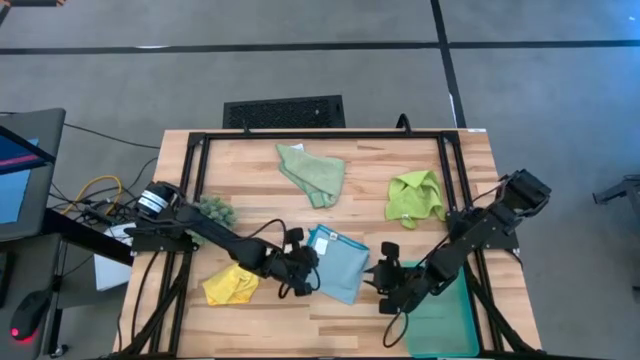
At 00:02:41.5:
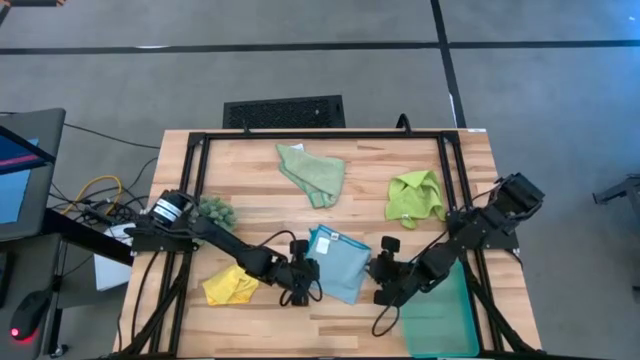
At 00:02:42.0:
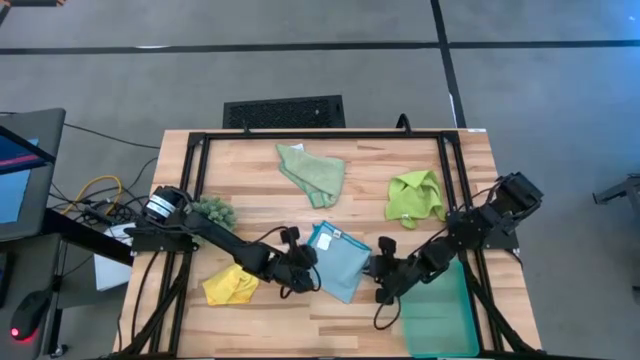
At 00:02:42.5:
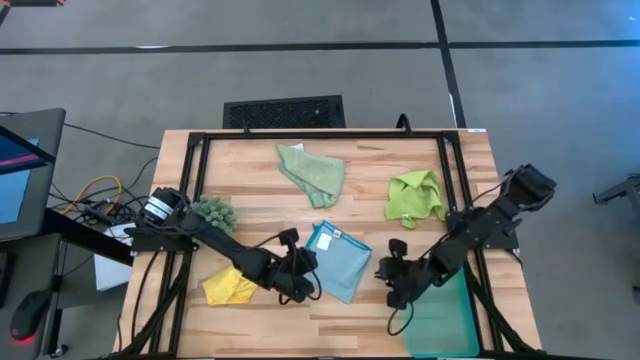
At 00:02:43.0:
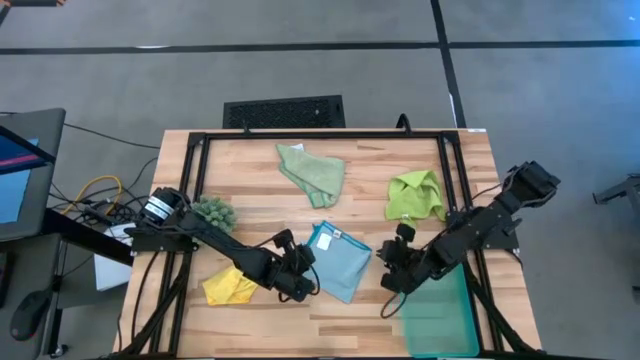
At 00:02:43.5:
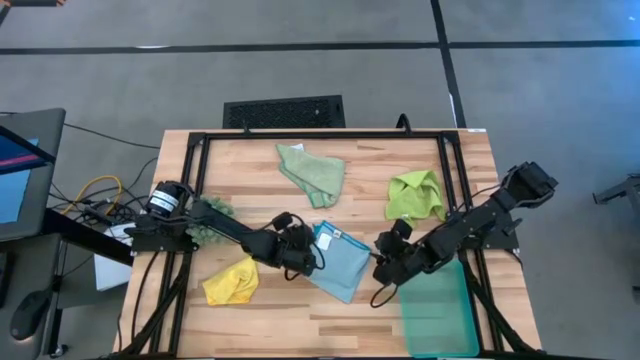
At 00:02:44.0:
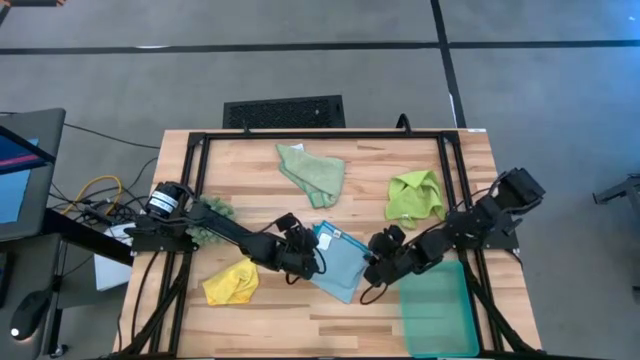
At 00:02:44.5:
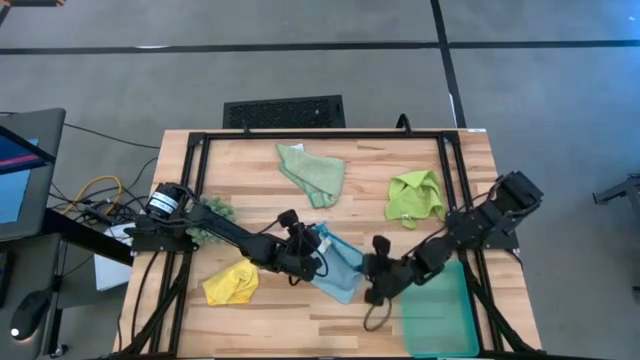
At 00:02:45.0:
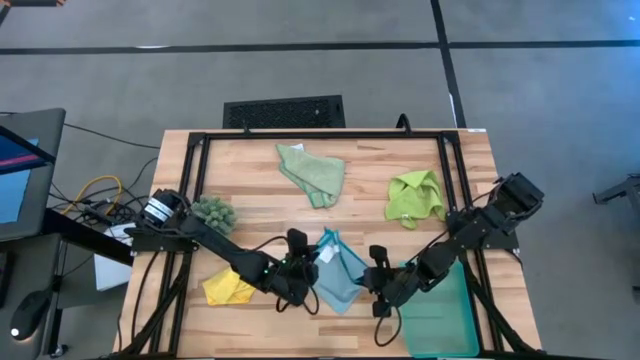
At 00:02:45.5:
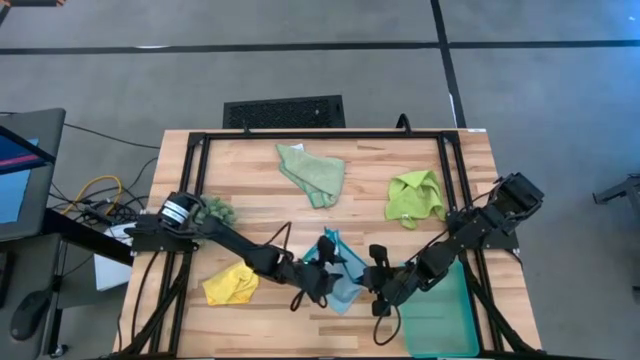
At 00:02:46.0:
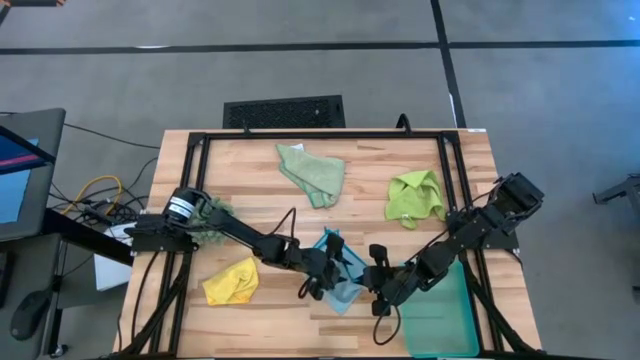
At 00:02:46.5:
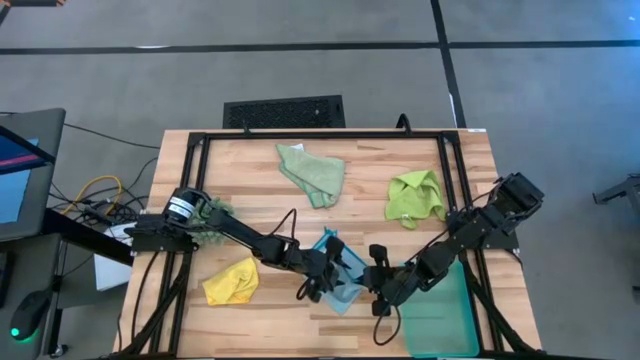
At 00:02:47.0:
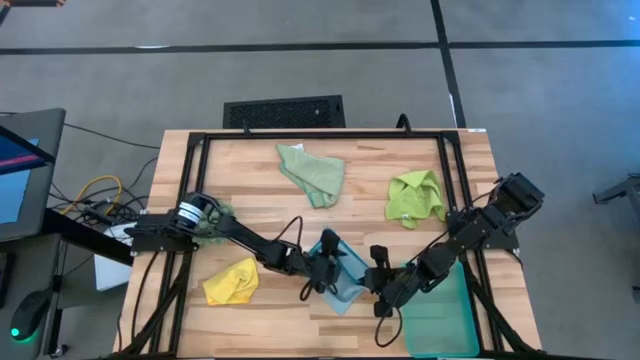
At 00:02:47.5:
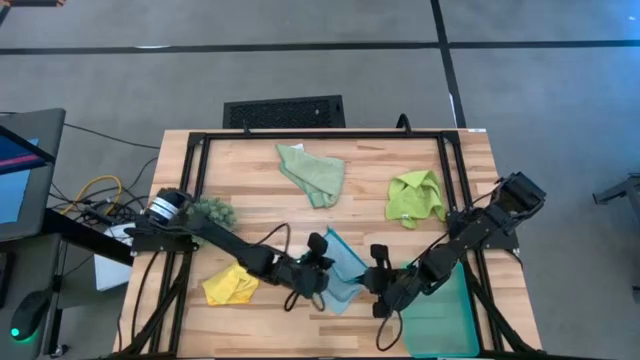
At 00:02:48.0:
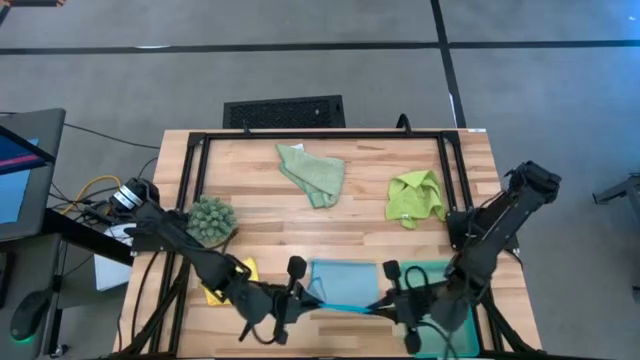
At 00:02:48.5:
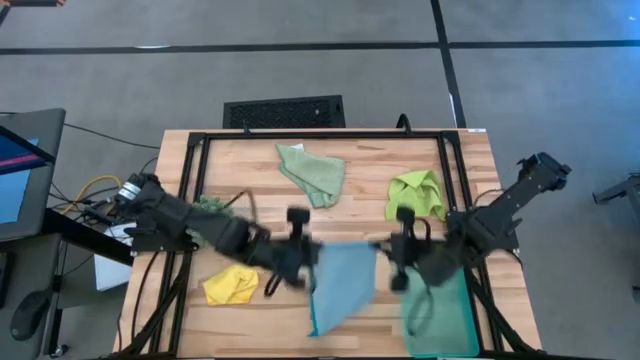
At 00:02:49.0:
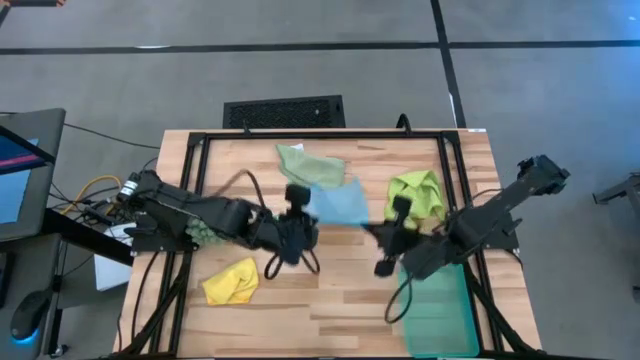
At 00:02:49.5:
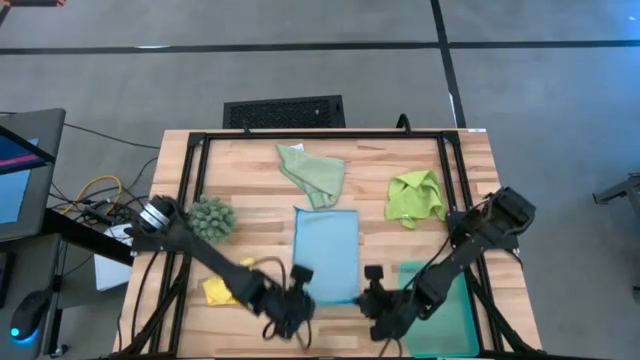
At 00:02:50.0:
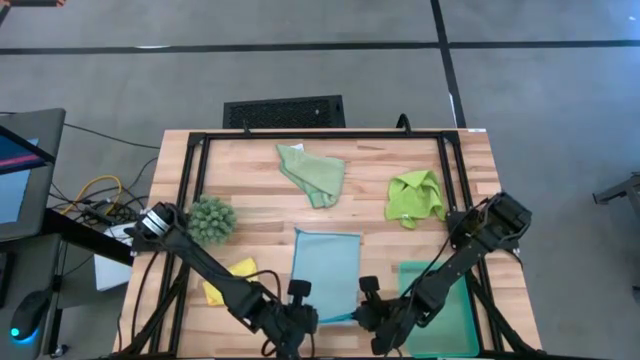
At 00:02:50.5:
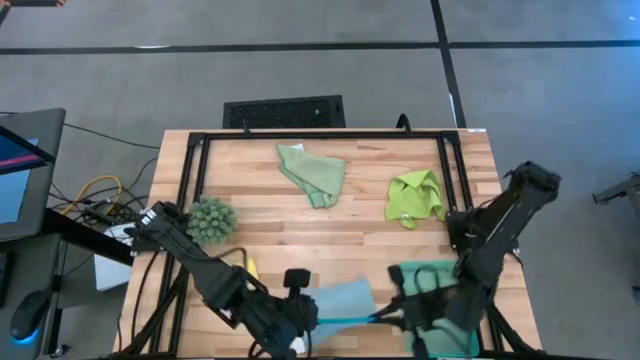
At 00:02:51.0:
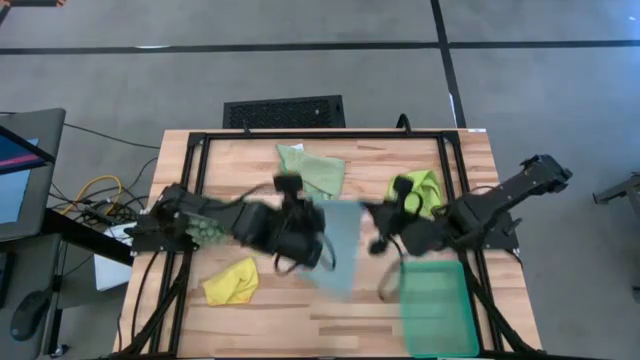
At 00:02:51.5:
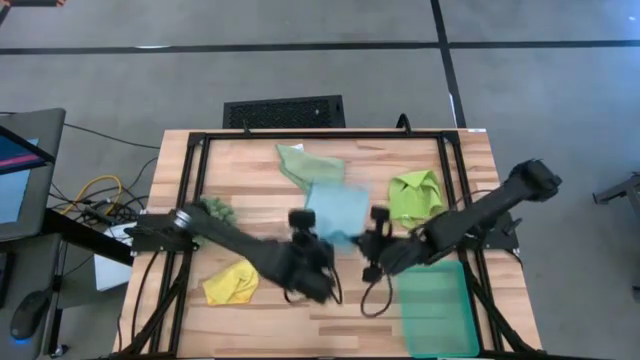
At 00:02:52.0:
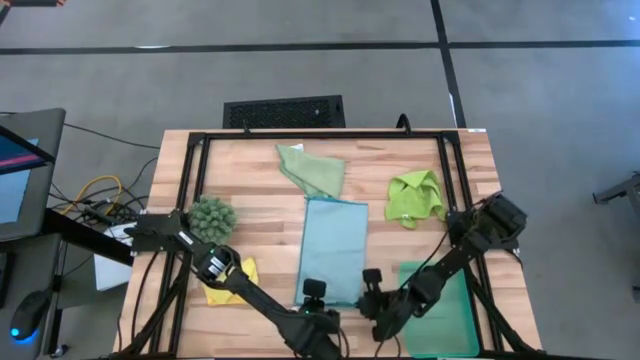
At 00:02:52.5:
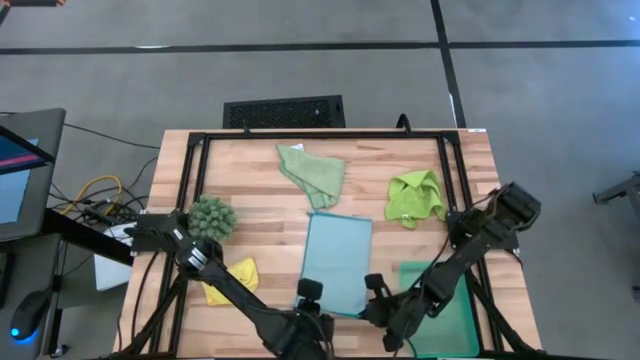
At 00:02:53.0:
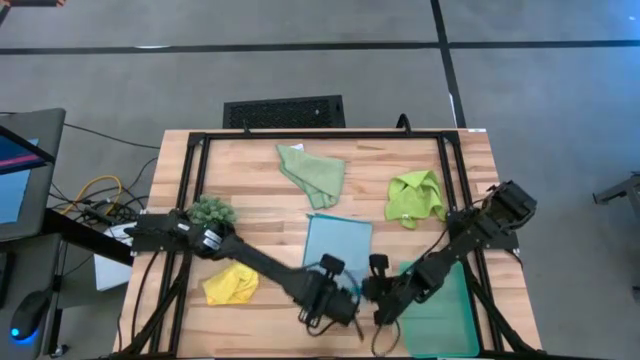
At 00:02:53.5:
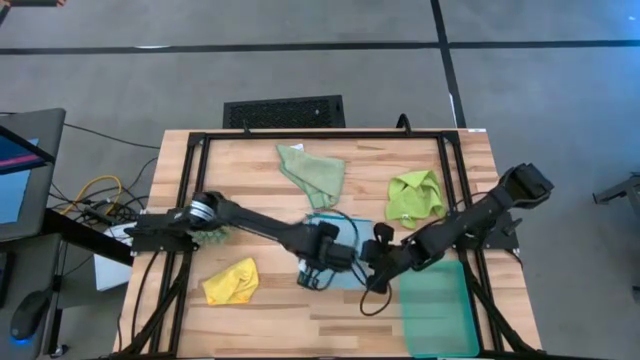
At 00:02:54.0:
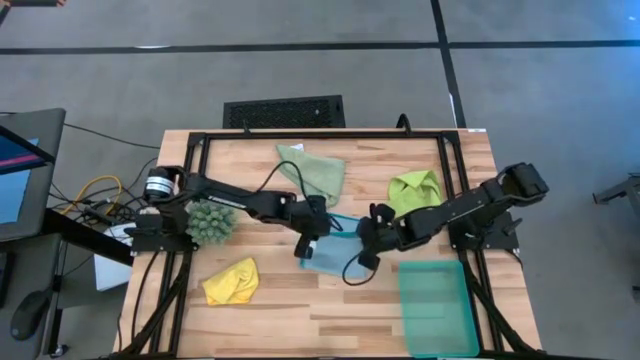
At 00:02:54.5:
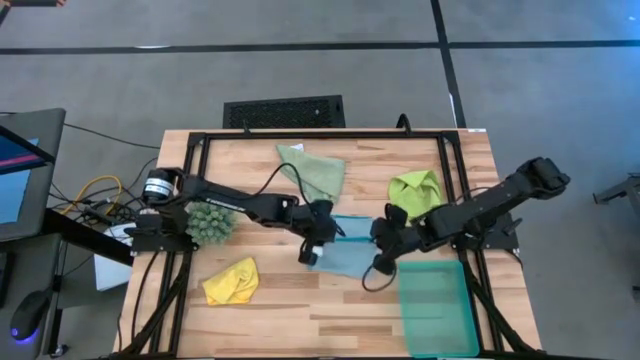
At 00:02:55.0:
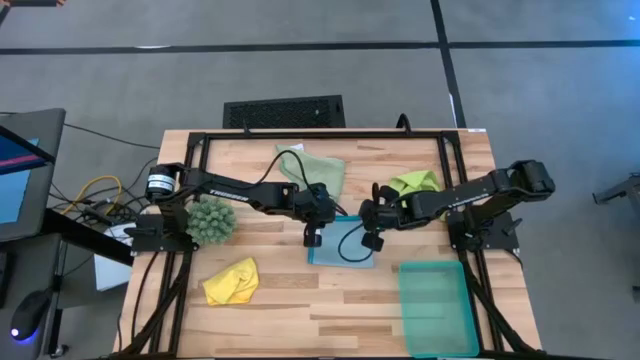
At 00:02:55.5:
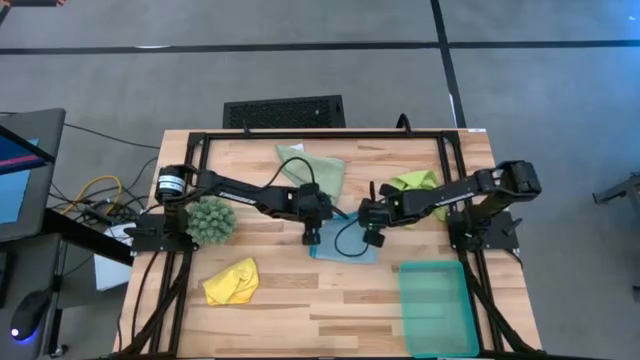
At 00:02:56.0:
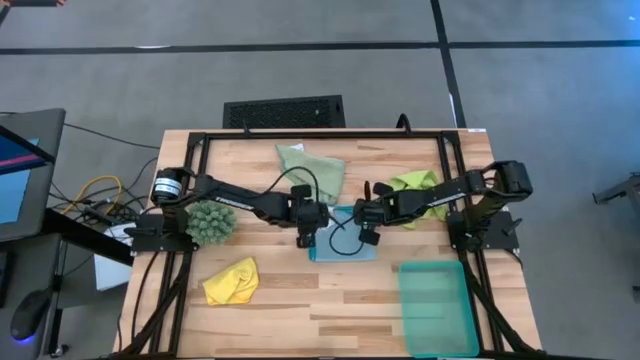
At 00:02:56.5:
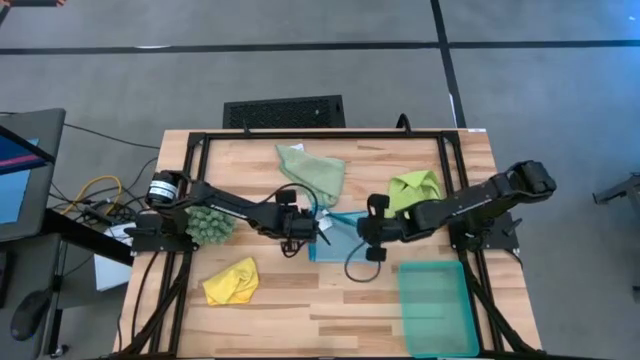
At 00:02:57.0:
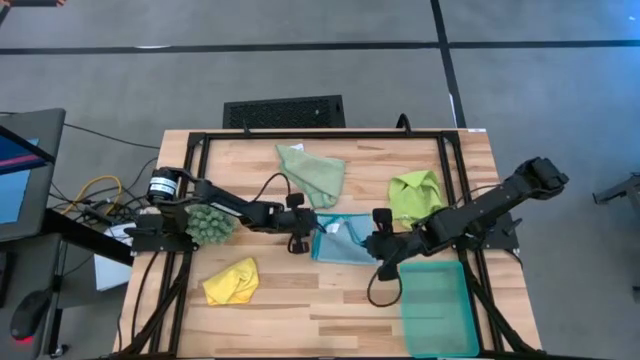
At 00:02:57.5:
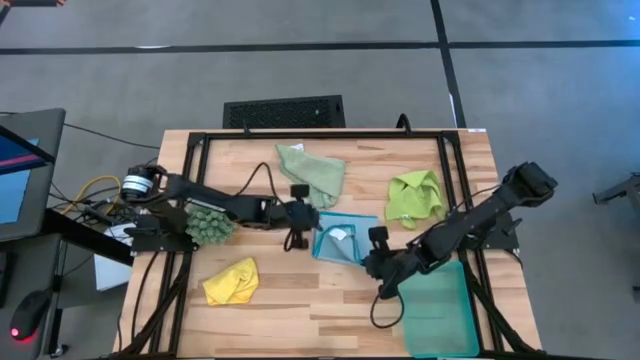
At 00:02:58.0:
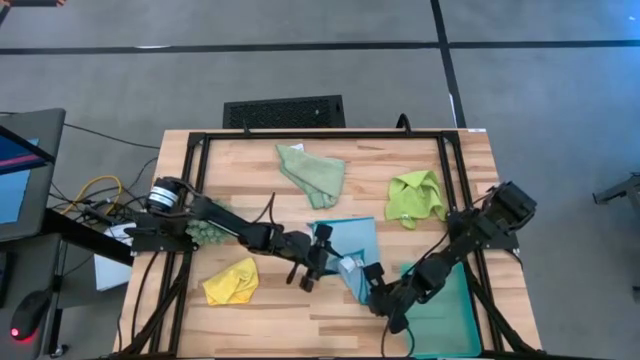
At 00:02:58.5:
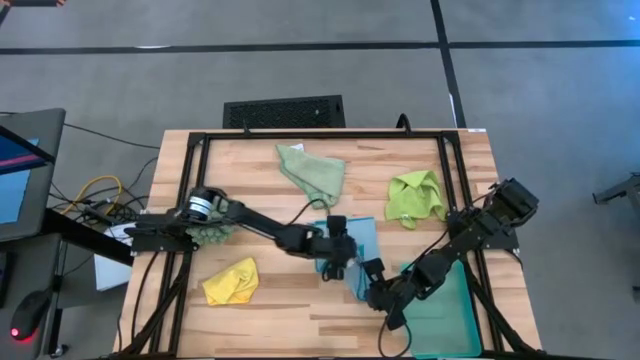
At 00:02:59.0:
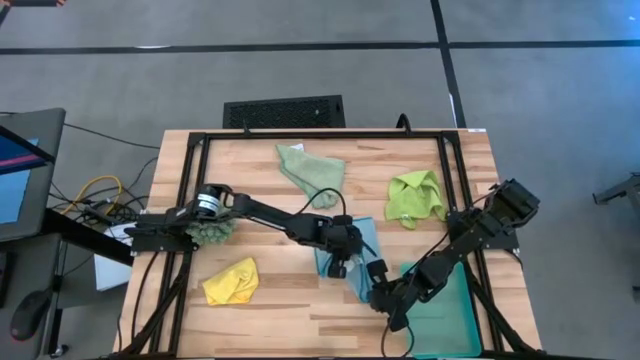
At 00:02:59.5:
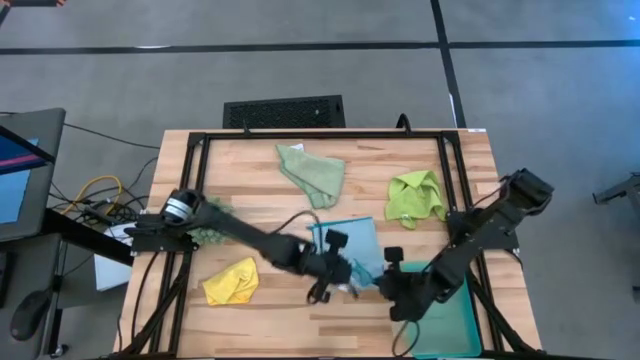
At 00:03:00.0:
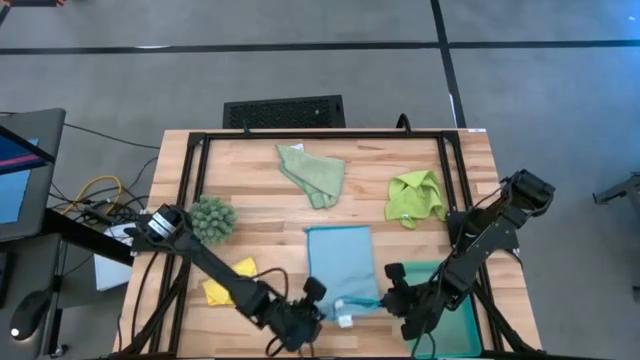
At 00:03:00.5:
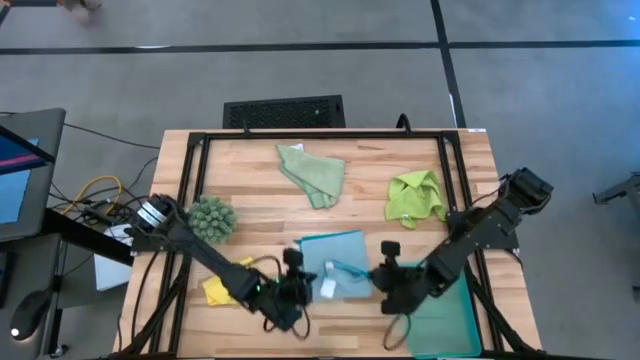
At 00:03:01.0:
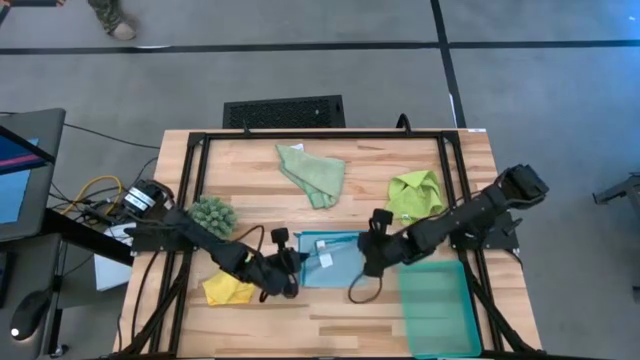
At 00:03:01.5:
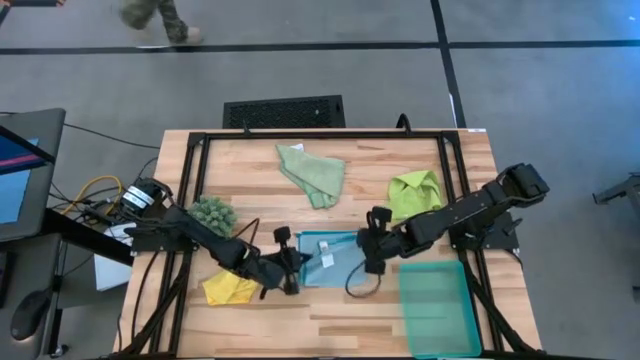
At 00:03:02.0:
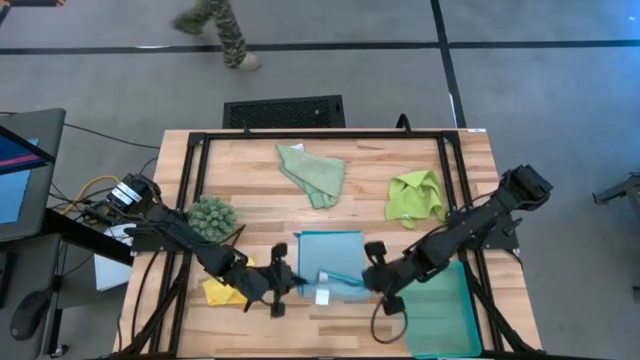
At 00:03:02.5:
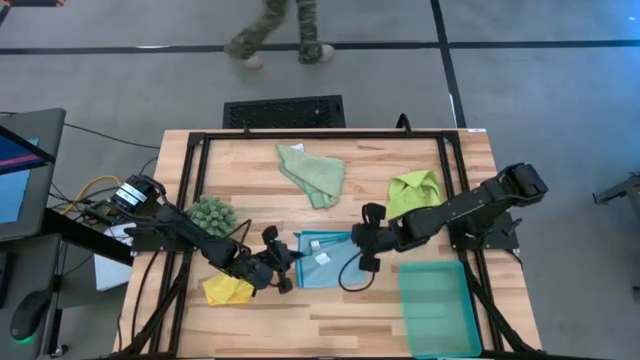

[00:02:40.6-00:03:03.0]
Task: Fold microfiber towels
Fold the blue microfiber cloth
